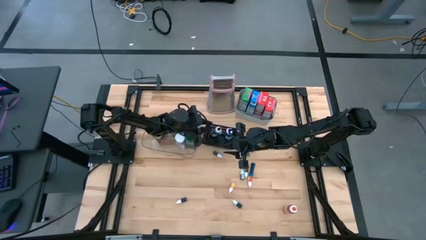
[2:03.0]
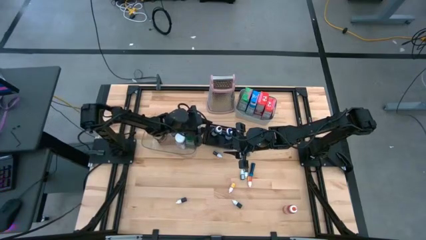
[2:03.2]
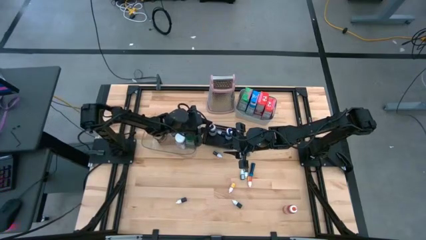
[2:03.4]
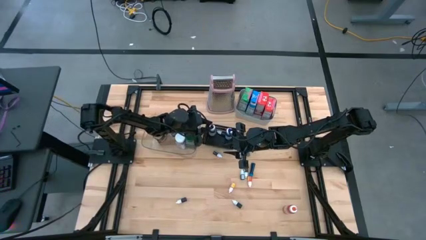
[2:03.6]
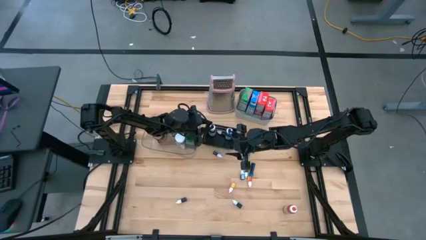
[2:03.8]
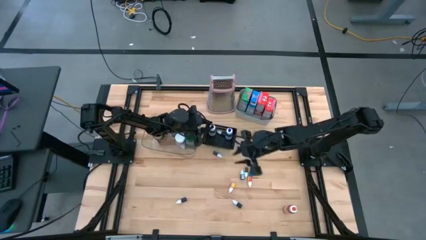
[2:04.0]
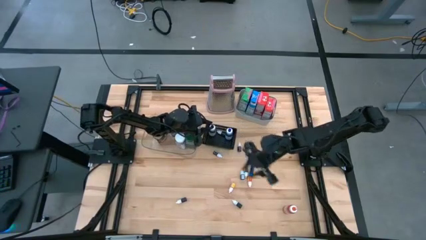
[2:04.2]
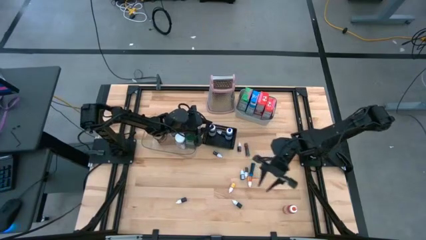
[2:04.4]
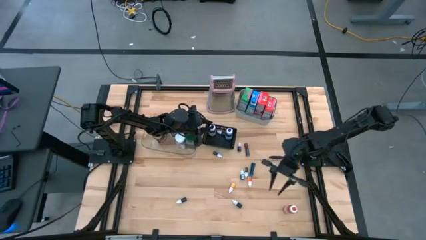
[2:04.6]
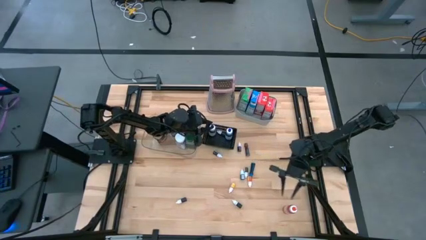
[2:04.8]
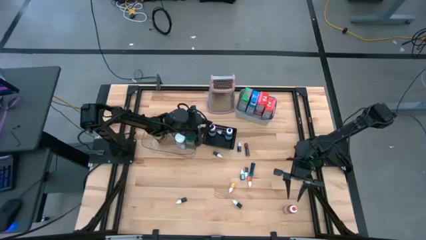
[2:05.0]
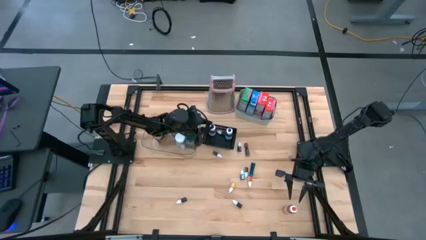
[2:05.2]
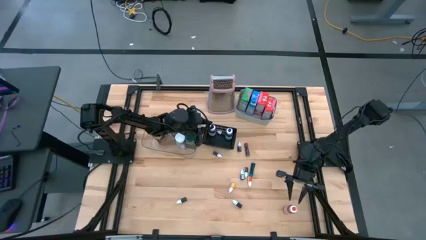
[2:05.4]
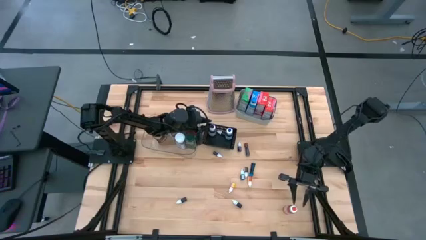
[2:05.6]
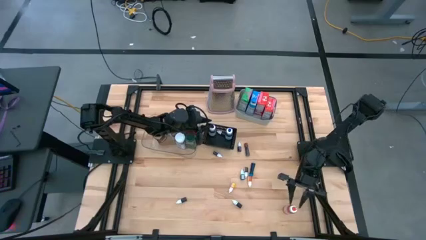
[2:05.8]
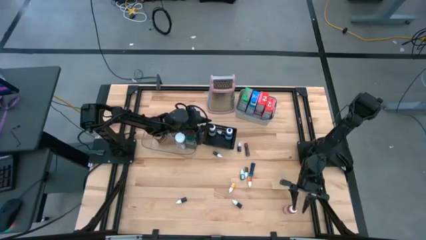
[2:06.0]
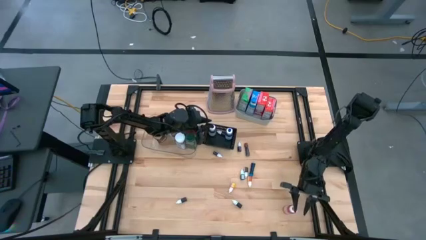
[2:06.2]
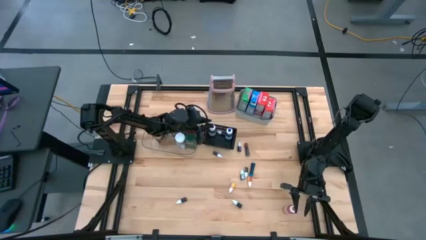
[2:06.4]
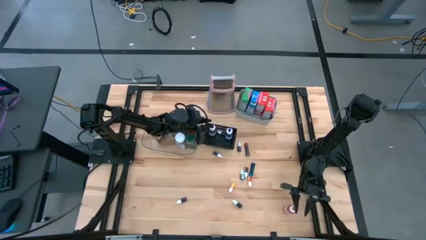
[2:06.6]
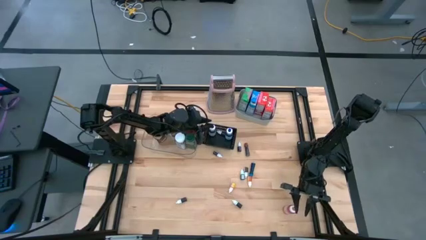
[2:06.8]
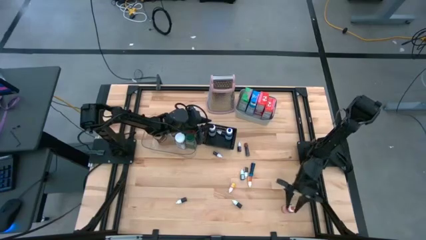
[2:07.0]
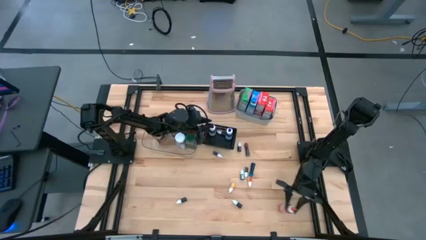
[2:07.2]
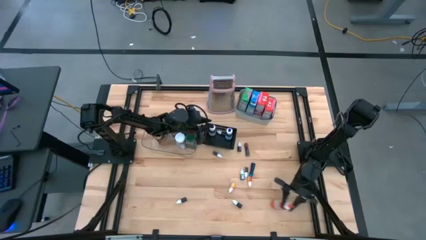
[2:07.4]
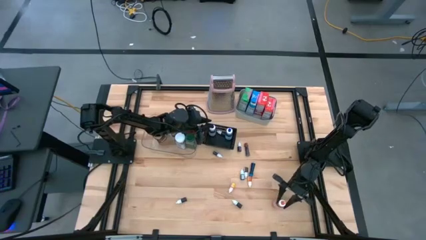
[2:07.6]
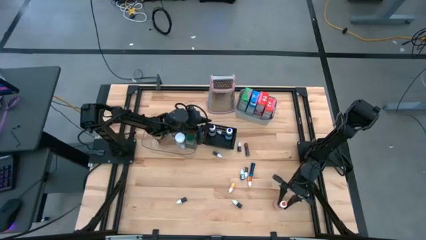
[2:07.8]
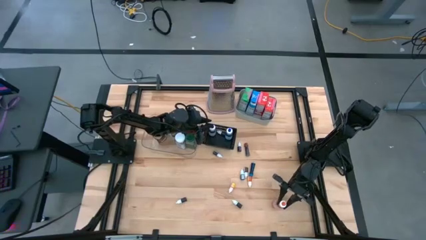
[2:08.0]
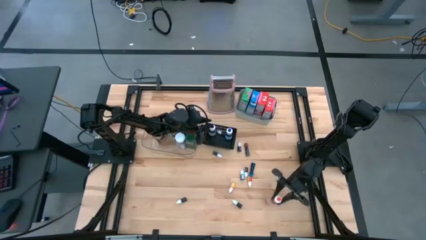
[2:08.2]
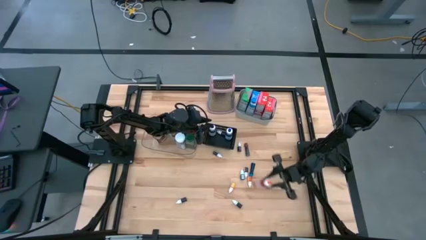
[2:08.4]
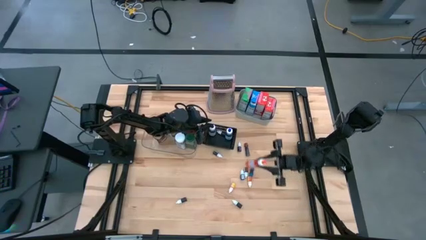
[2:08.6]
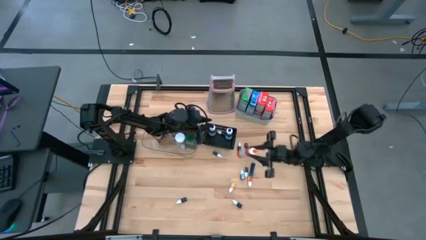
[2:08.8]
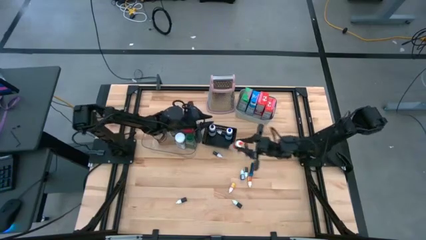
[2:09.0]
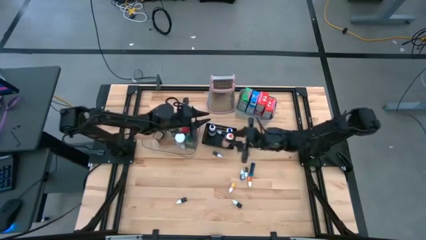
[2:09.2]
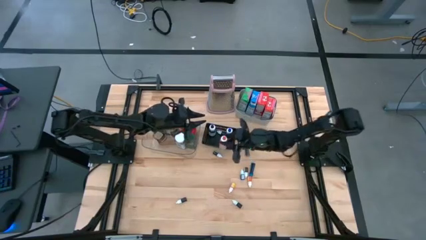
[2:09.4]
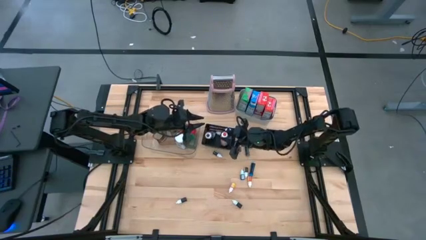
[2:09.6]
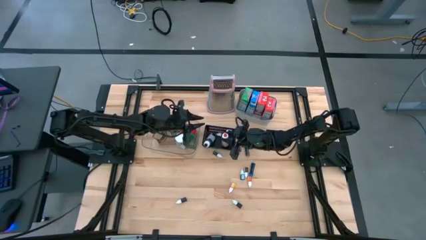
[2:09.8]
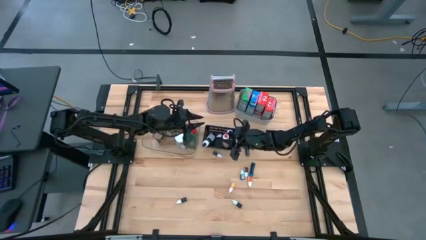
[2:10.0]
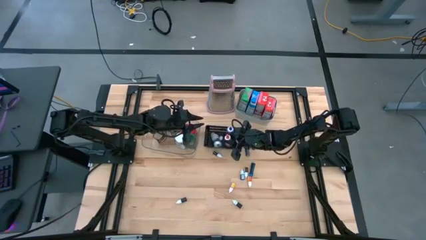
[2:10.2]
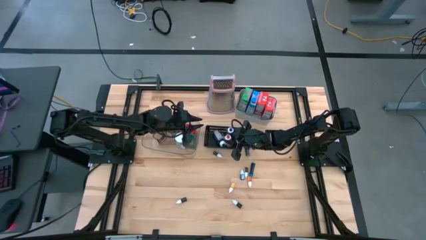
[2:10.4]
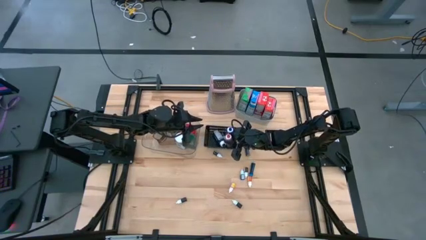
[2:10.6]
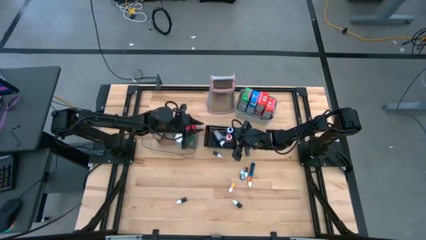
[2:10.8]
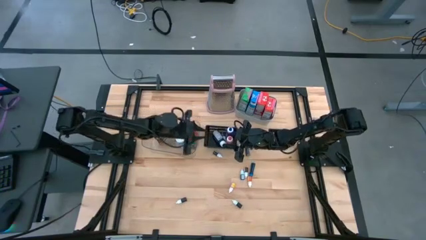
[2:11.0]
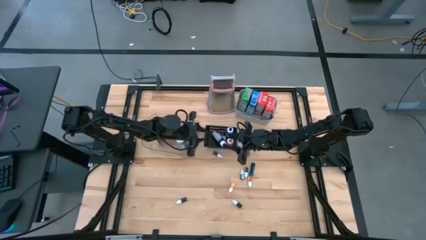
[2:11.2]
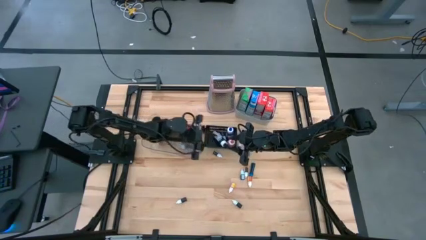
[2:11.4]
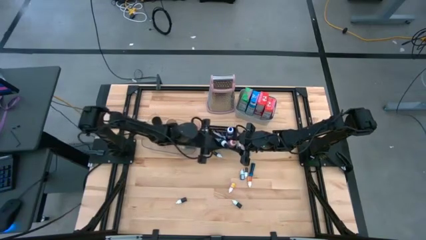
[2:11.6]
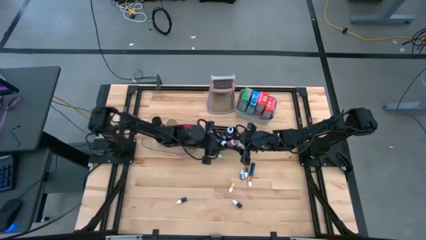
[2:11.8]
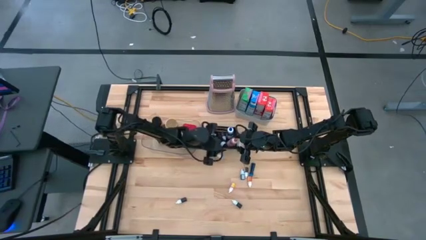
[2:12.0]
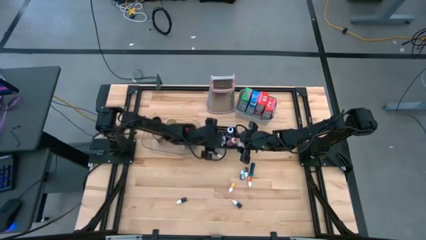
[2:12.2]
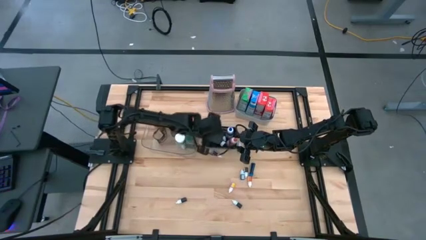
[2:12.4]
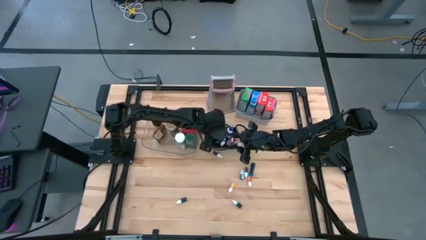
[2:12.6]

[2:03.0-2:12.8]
Task: Pick & Place Kitchen Items
Put the large orange food coloring bottle into the black bin

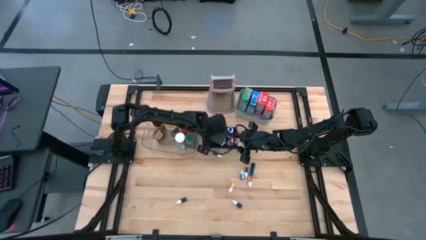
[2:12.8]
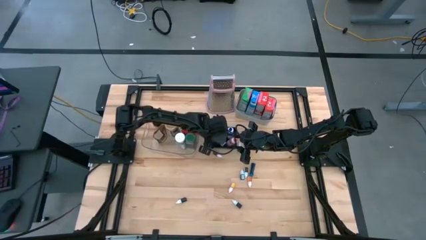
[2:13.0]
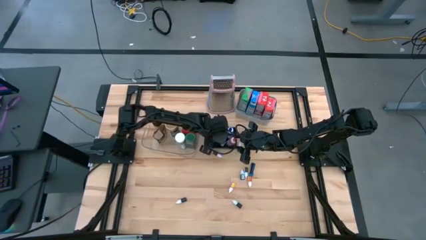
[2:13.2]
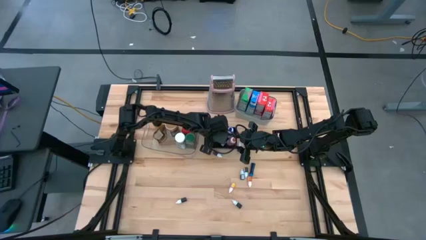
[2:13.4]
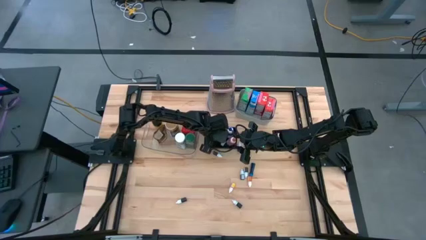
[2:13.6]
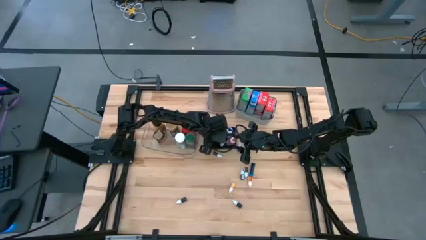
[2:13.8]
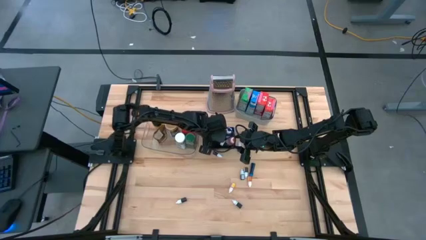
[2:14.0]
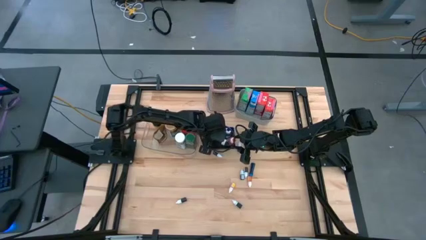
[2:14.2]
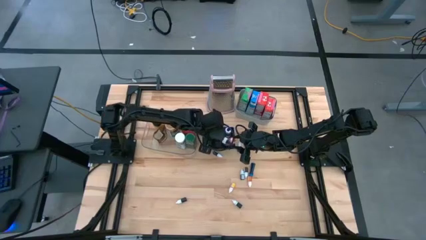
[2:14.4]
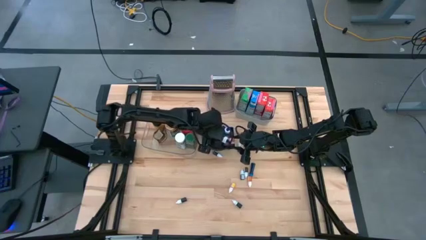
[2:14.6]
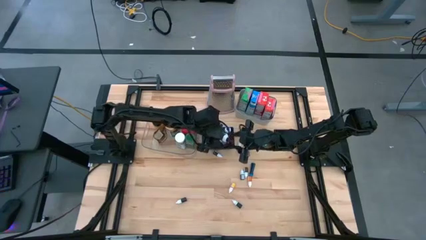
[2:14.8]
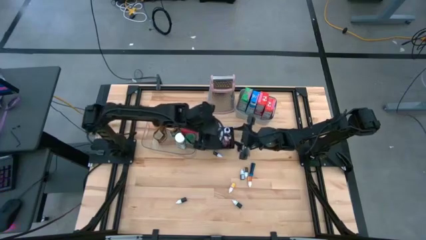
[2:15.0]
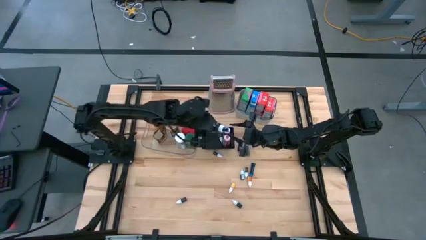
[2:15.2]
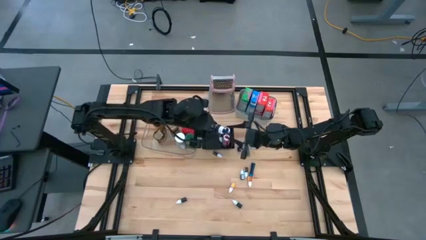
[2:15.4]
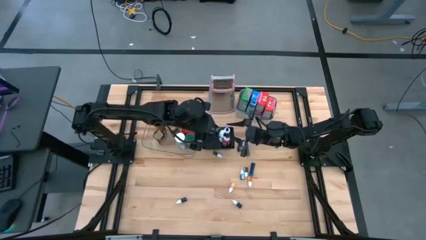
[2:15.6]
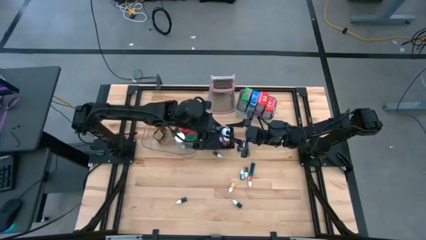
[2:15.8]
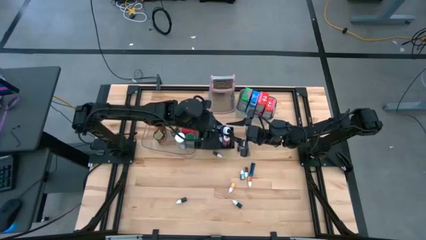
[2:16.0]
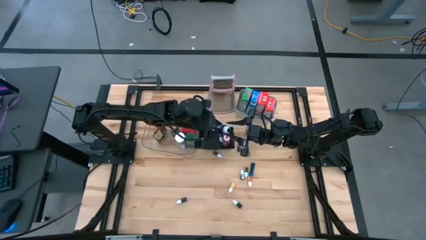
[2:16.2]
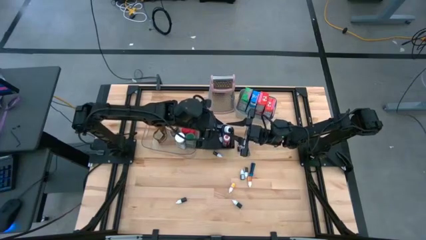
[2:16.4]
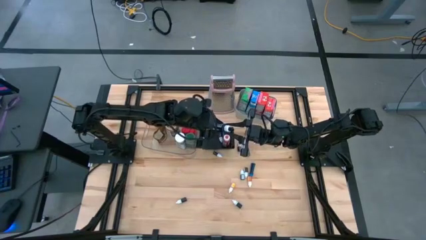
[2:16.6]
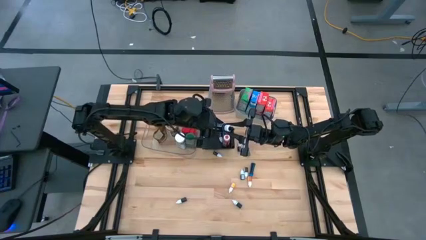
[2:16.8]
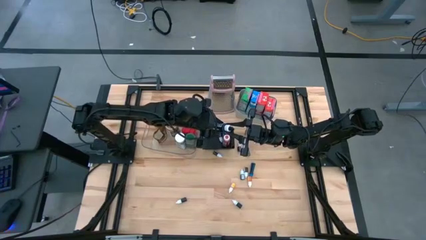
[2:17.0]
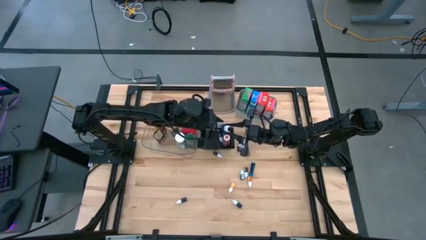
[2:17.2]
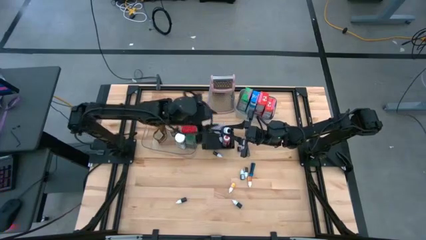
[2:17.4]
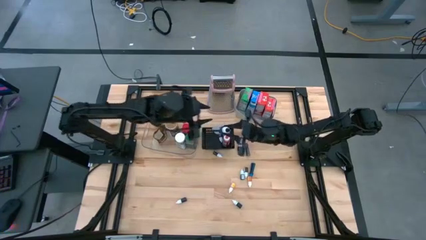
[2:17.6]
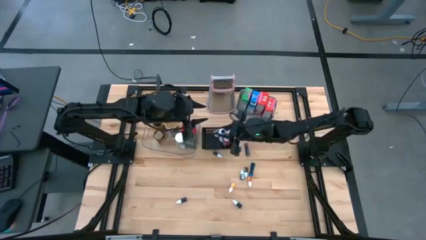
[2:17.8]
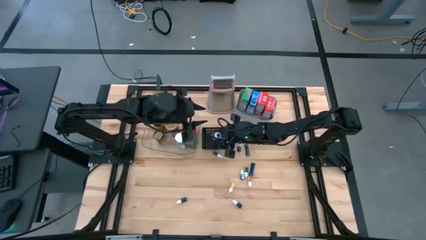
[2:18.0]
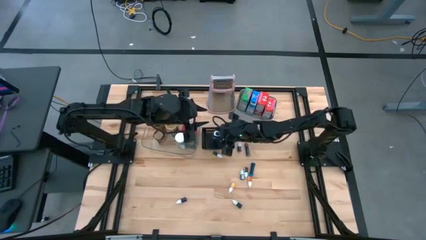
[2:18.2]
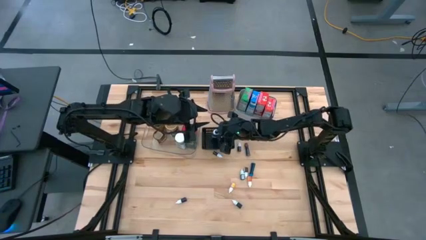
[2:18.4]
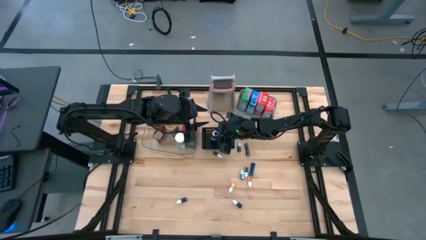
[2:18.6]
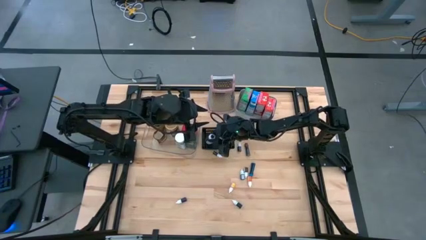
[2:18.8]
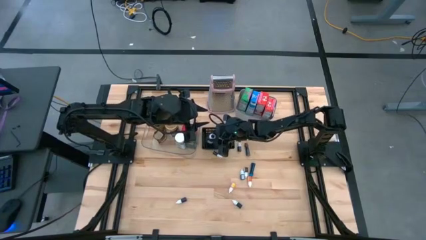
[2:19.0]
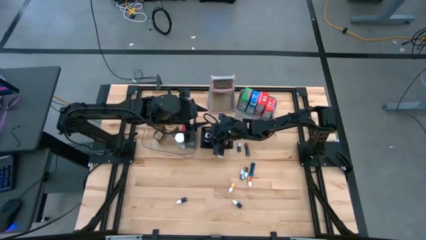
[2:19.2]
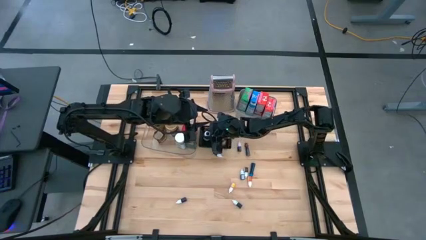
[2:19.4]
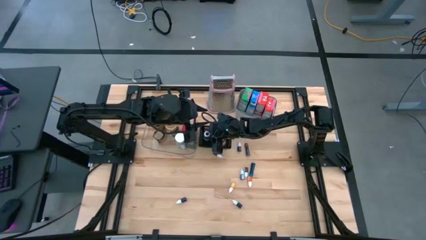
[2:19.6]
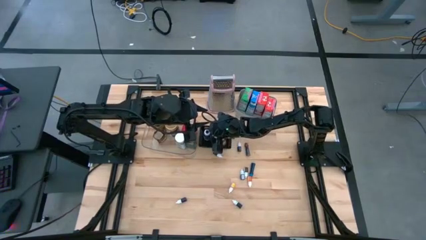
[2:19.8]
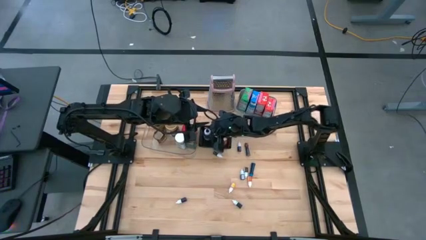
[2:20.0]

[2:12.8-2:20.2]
Adjust the black food coloring in the black bin
